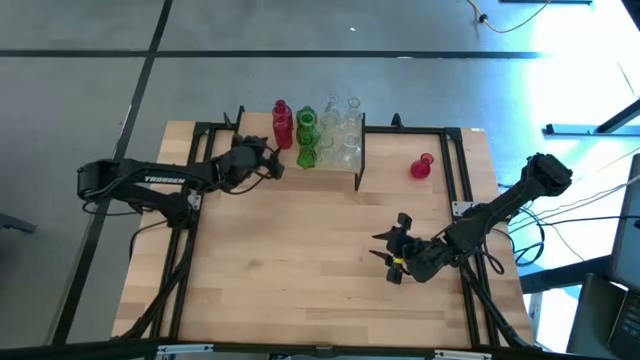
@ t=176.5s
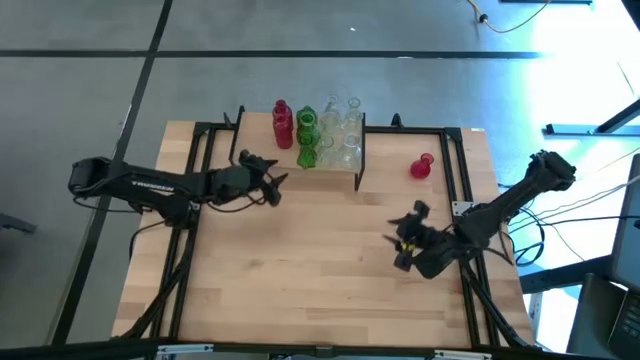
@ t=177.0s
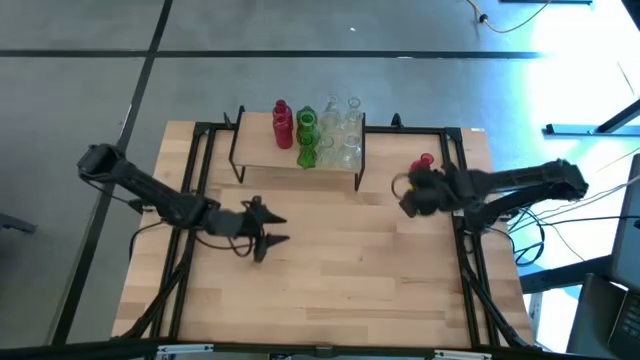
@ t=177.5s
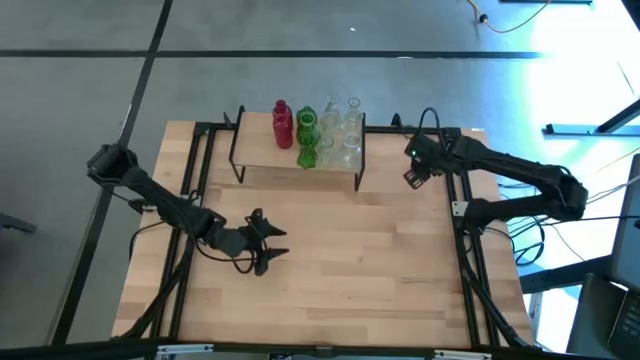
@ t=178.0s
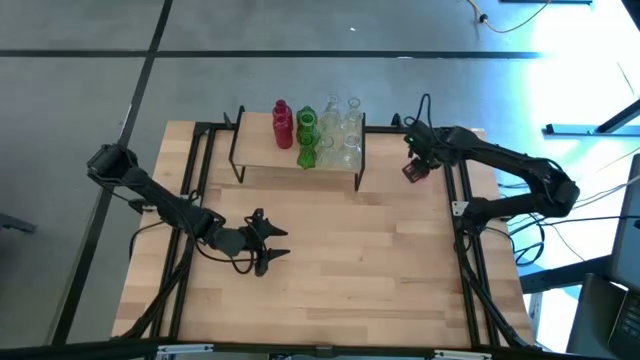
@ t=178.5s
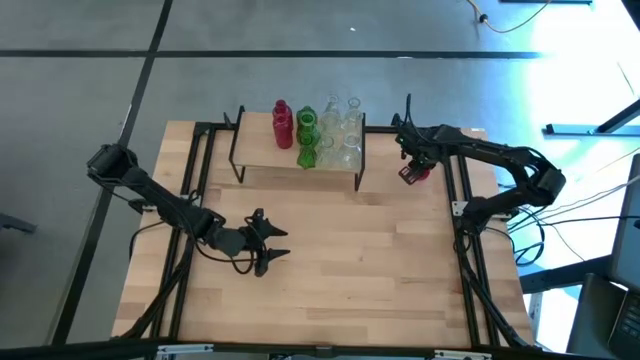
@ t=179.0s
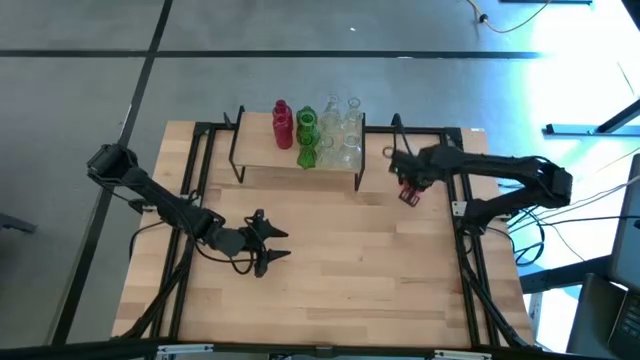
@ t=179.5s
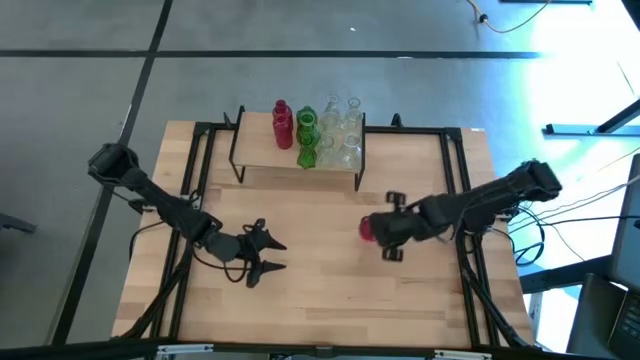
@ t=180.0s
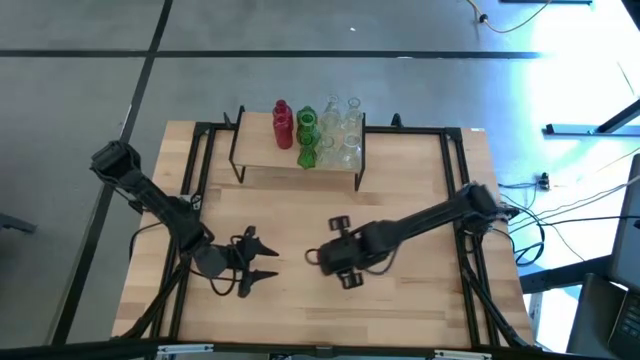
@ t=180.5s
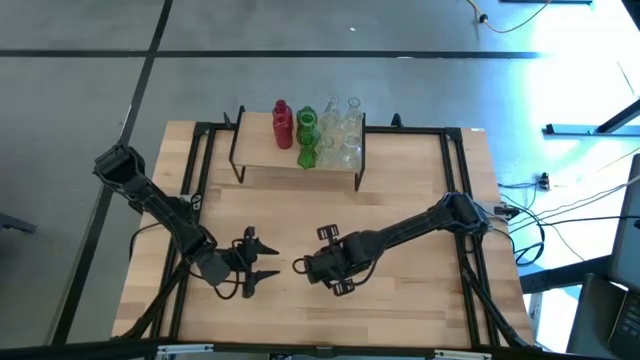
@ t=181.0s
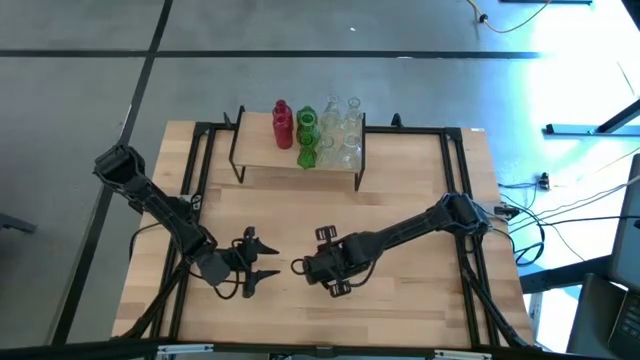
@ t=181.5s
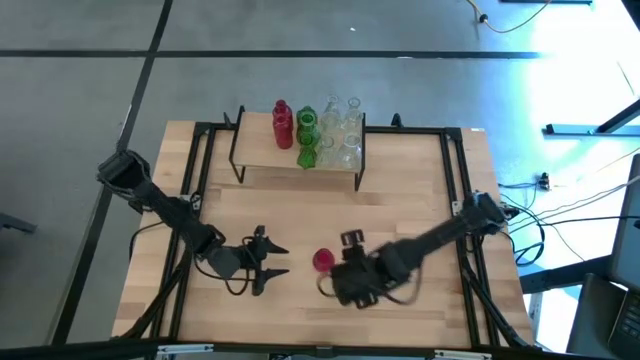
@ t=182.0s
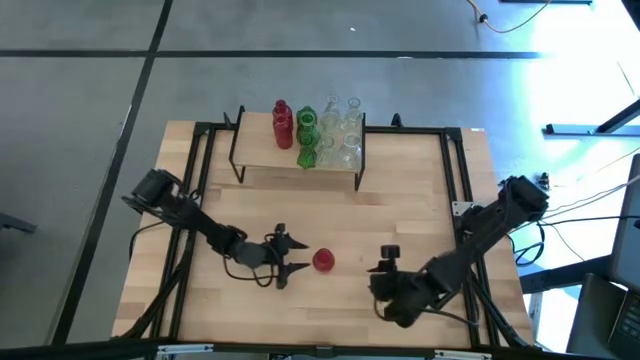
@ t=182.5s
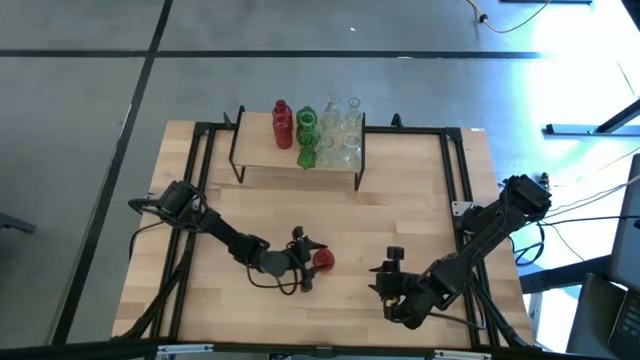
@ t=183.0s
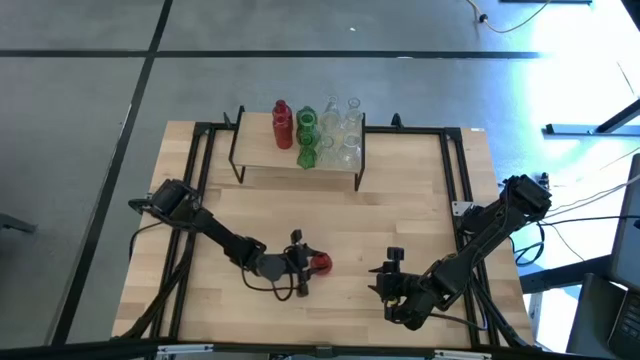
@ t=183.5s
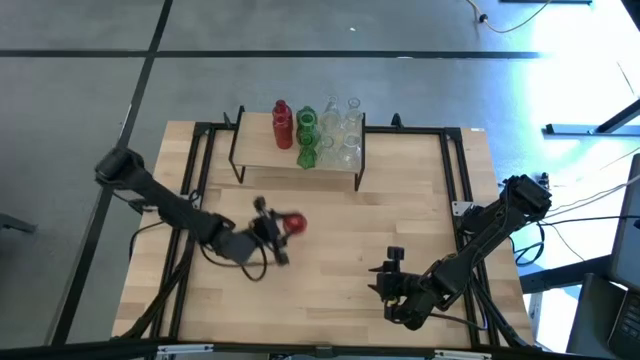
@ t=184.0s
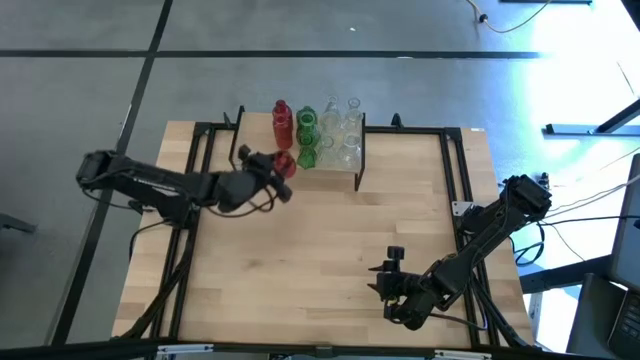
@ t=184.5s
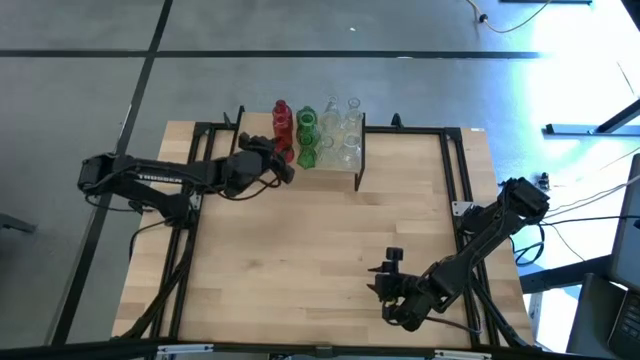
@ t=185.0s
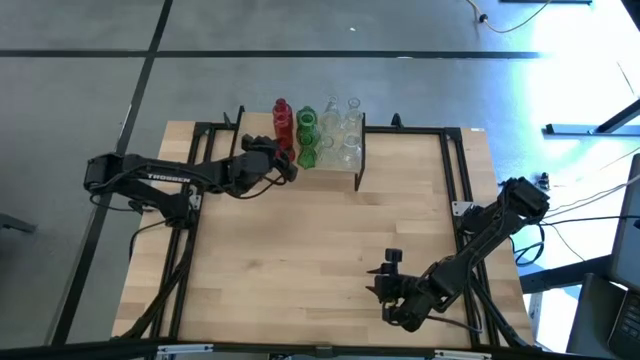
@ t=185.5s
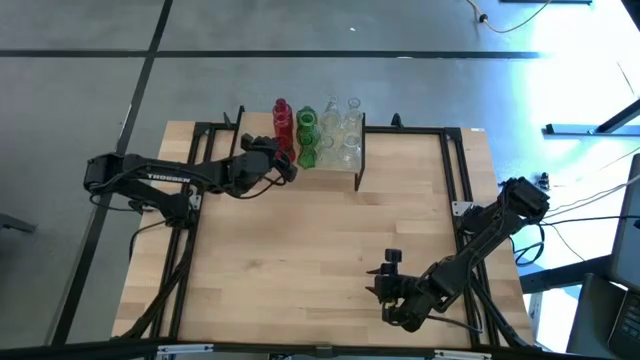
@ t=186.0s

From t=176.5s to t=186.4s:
Task: sort vases onto shelf
Put the red vase aligned with the other red vases on the shelf

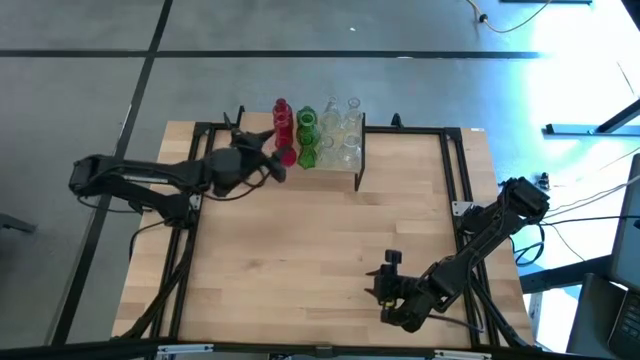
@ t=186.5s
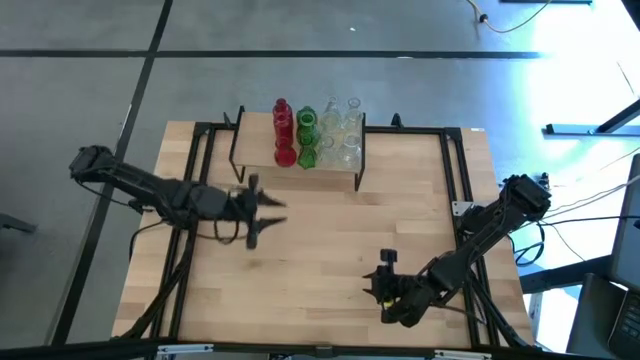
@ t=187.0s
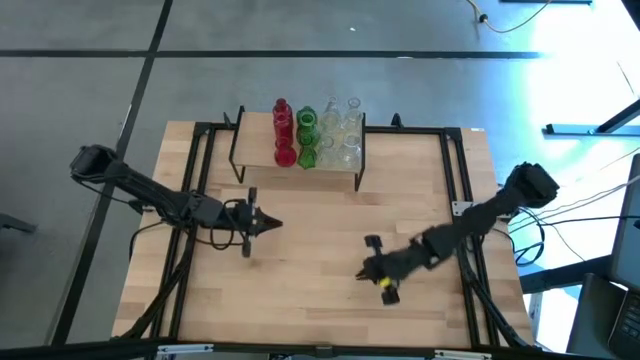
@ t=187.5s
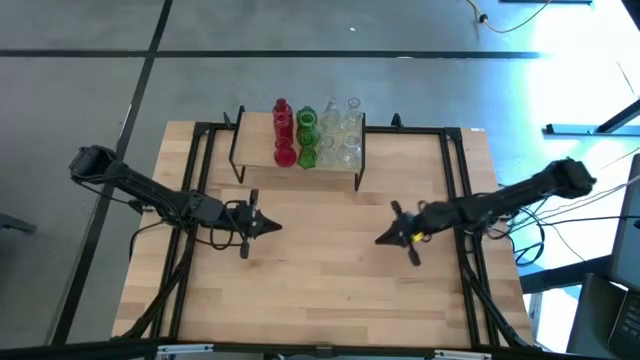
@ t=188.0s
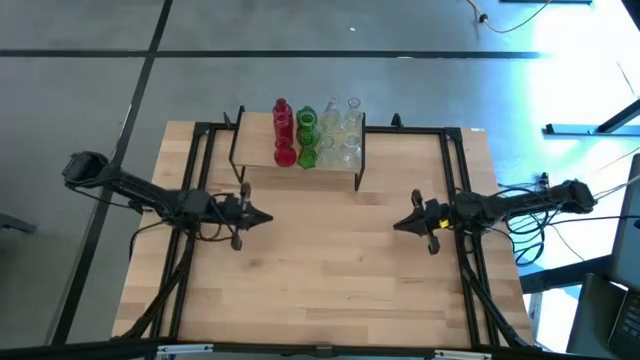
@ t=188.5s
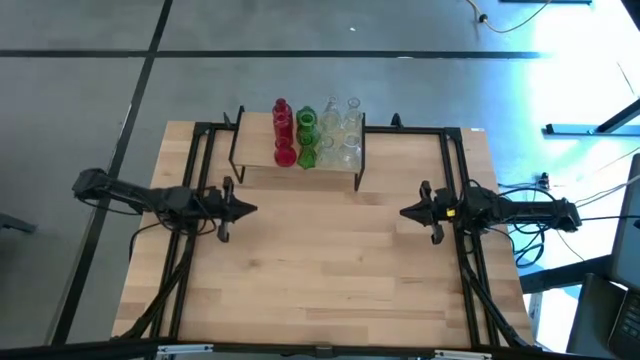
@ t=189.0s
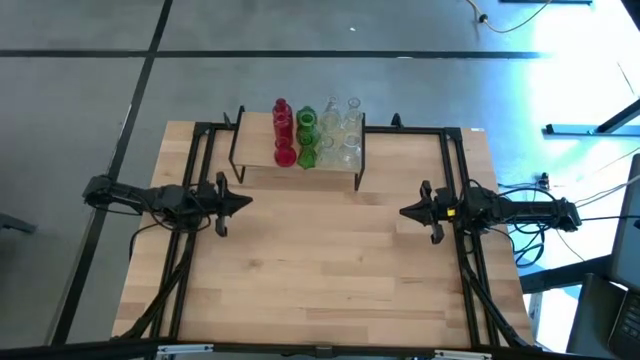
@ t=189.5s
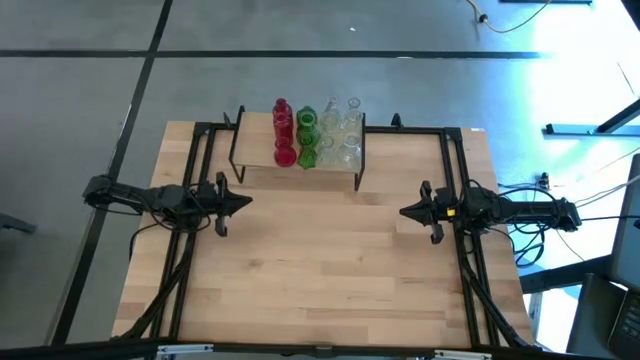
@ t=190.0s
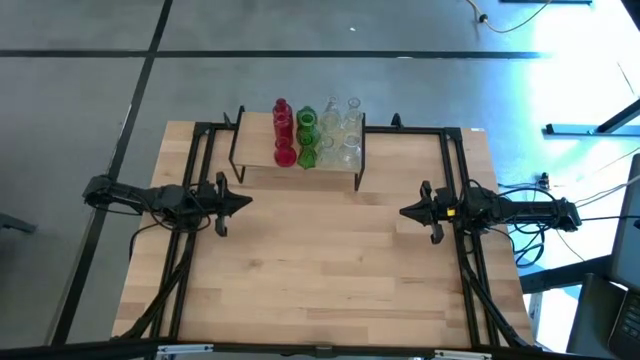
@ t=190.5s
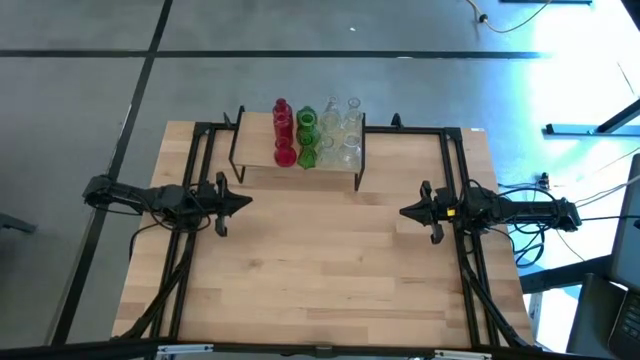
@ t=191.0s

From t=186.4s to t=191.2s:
Return to Home Position

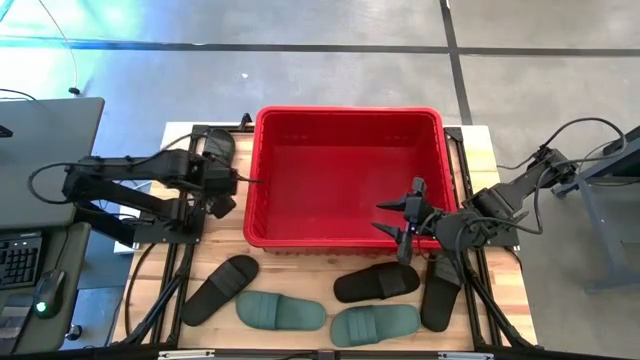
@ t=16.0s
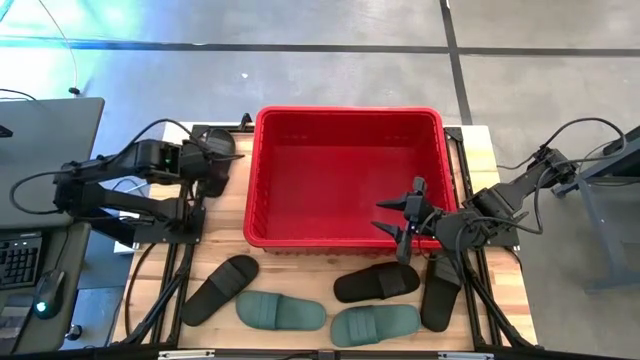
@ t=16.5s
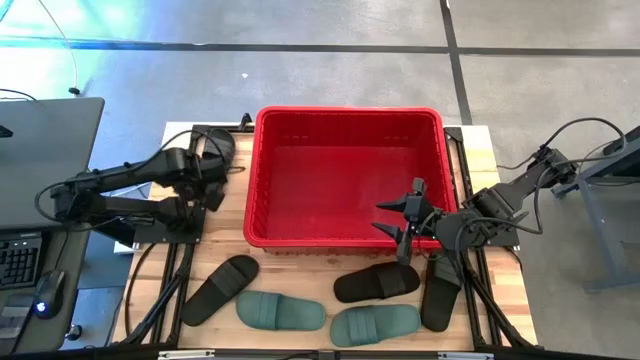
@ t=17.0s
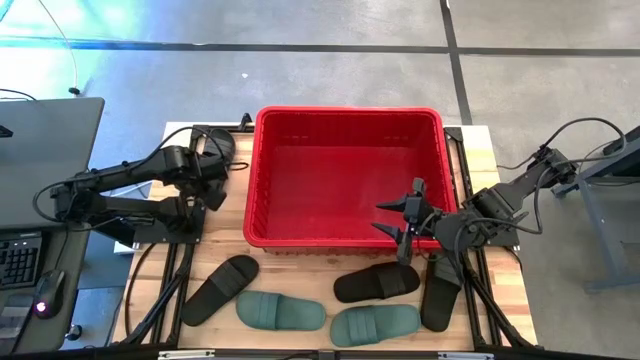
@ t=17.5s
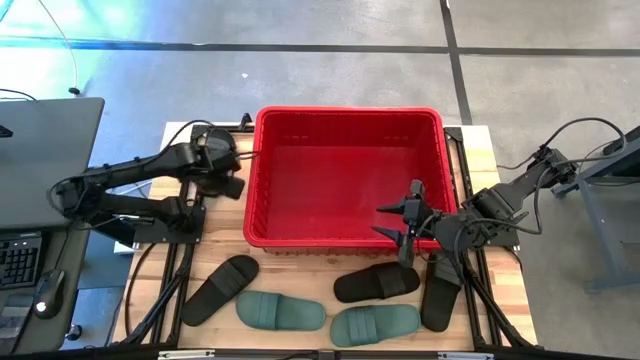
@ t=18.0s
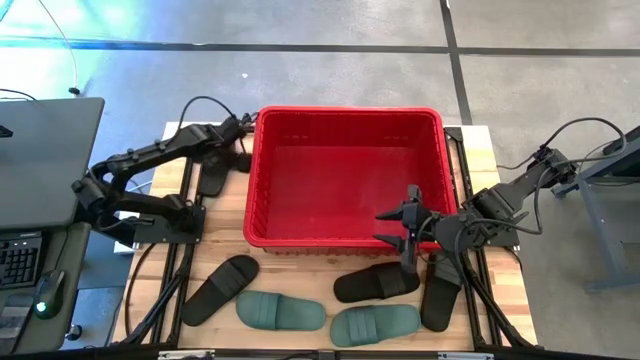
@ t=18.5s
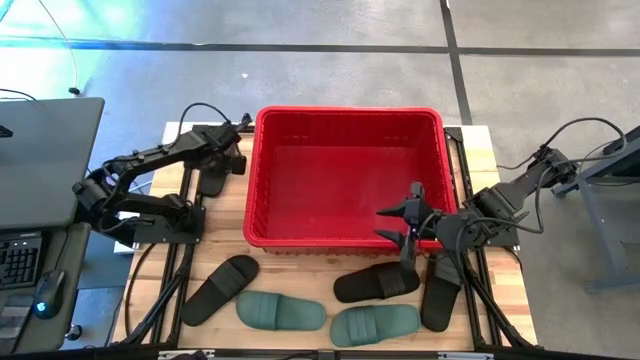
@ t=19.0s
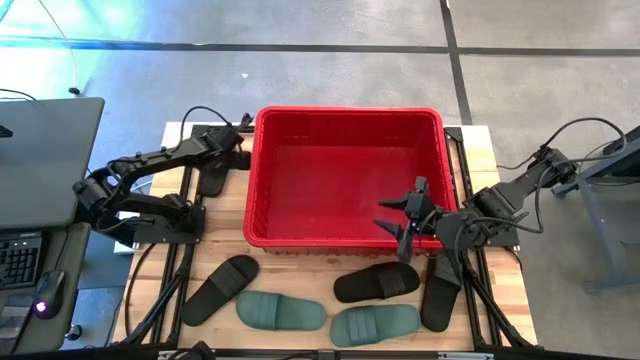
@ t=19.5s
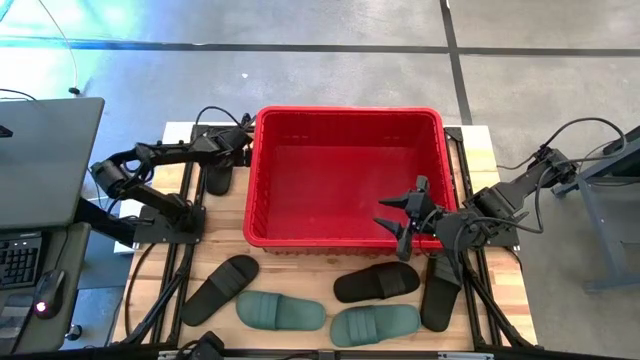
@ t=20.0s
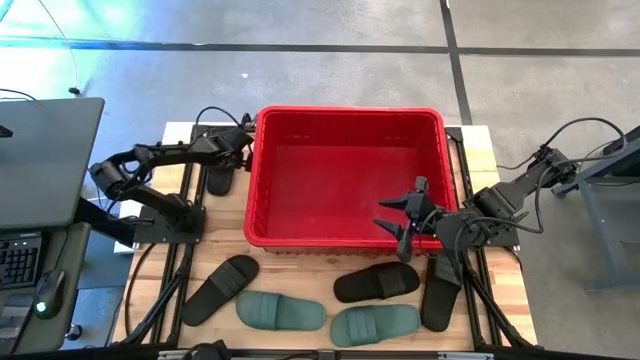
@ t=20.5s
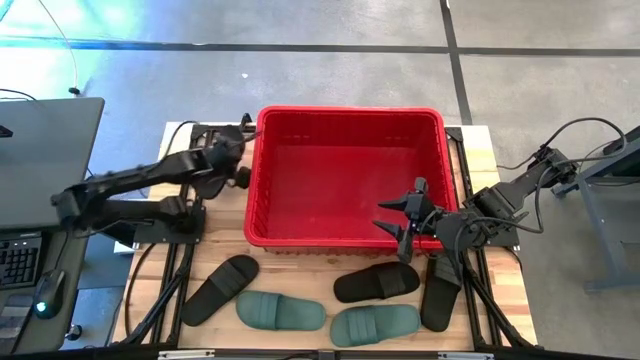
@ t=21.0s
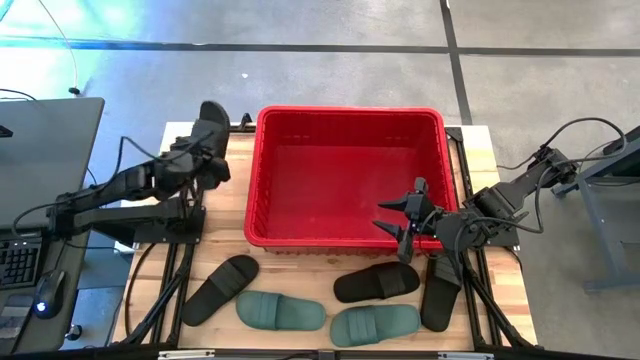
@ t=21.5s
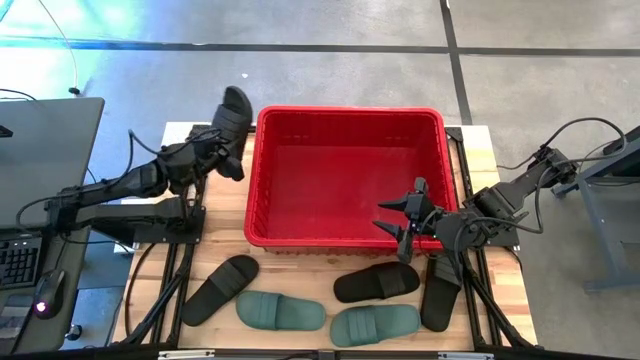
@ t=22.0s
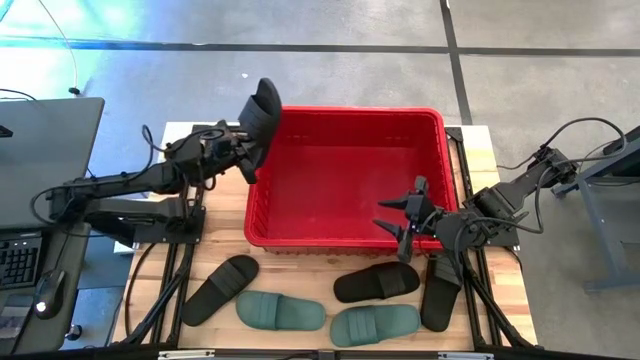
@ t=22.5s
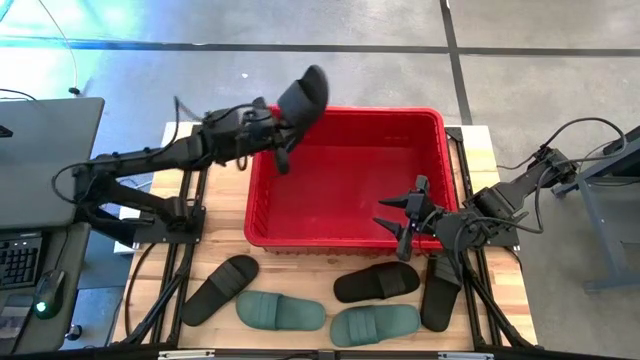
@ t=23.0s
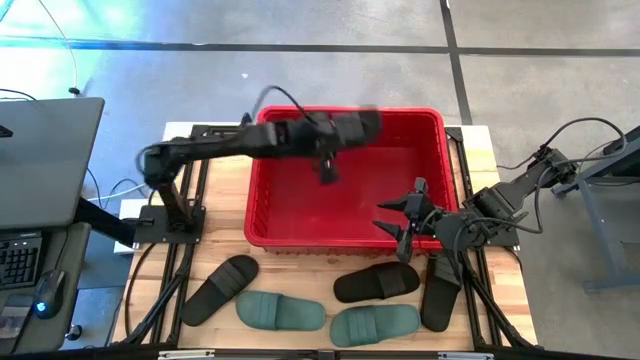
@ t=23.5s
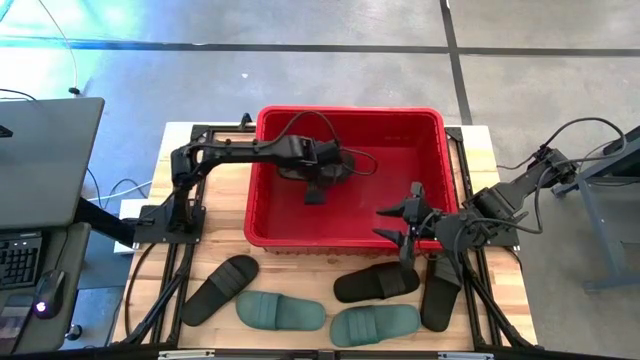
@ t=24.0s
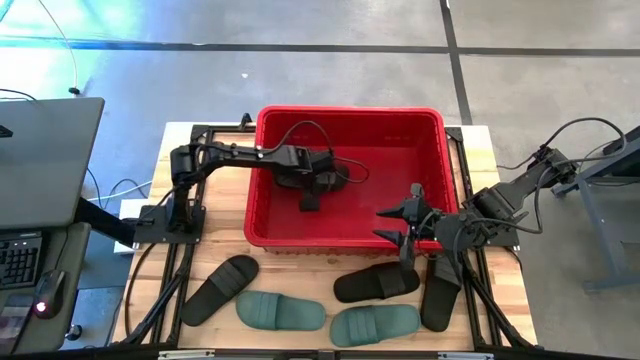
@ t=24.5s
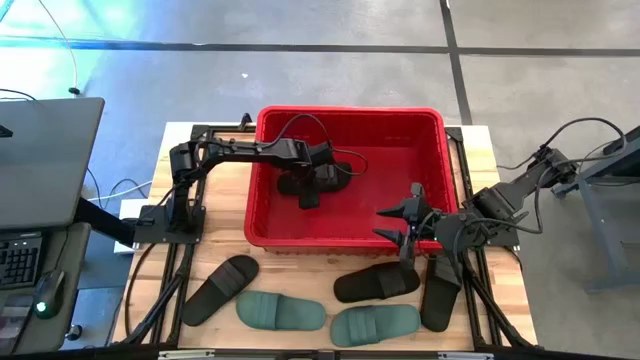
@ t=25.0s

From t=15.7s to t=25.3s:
Task: Pick and place slides into bin
Put the black slide into the red bin
